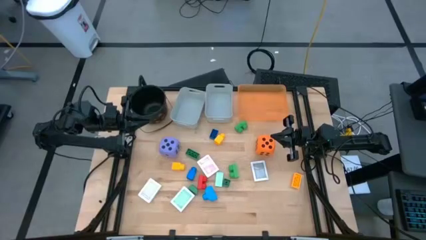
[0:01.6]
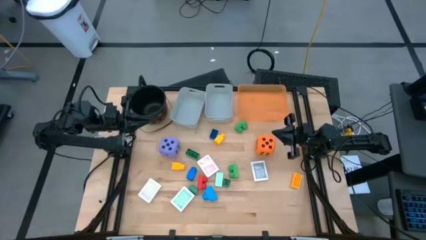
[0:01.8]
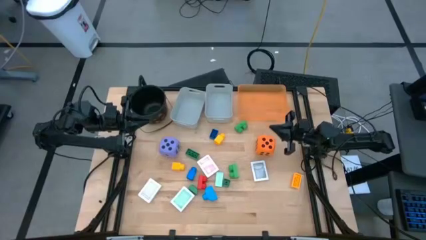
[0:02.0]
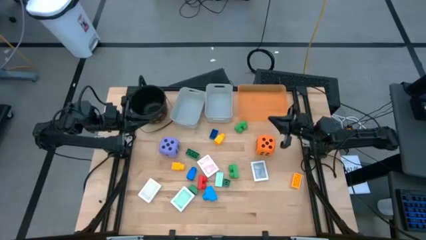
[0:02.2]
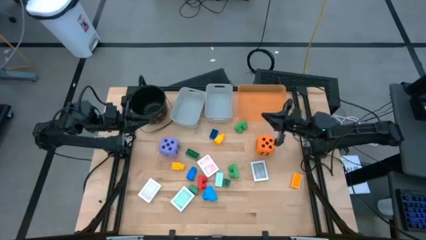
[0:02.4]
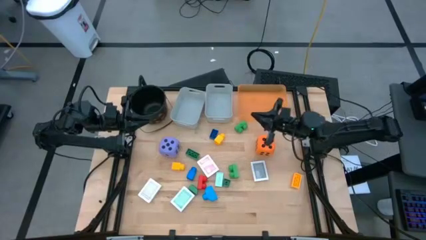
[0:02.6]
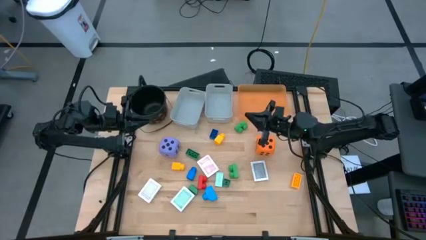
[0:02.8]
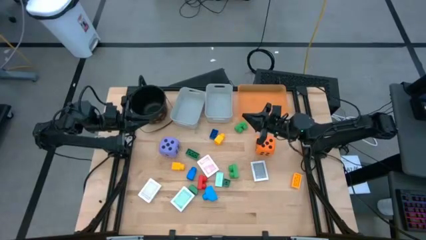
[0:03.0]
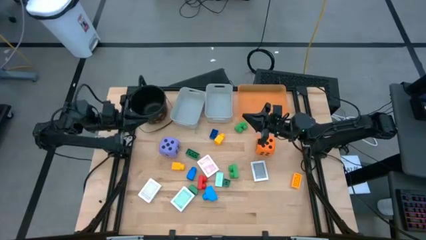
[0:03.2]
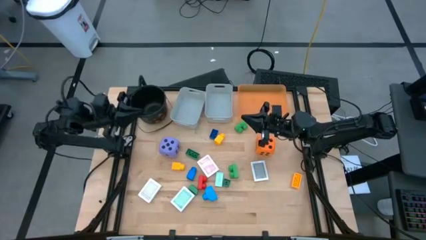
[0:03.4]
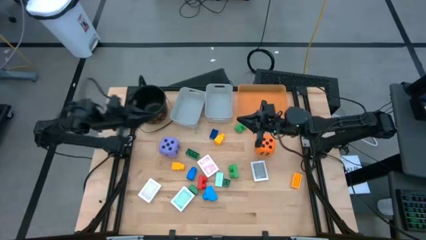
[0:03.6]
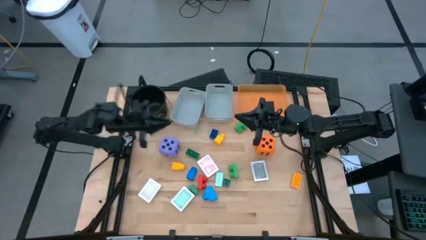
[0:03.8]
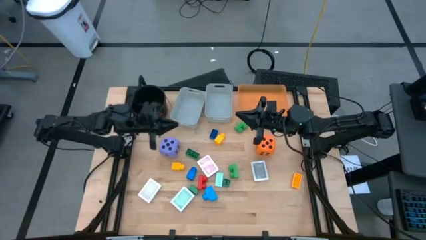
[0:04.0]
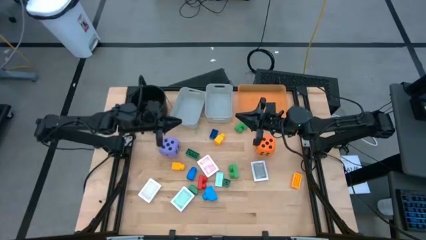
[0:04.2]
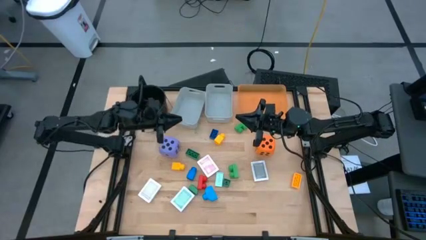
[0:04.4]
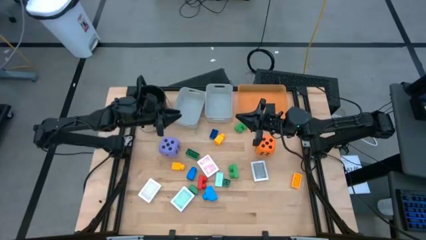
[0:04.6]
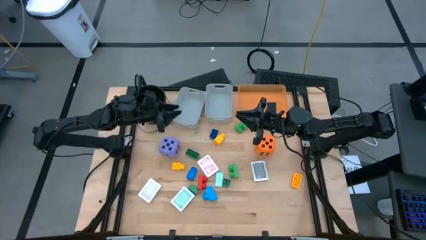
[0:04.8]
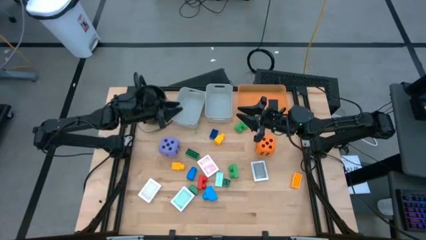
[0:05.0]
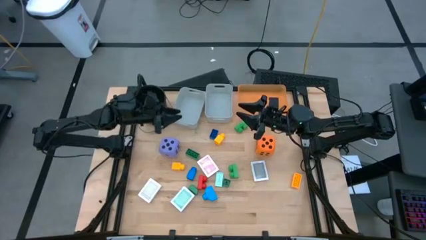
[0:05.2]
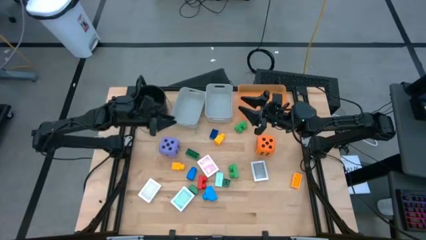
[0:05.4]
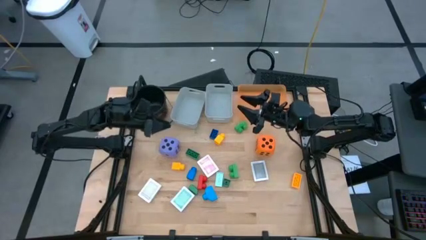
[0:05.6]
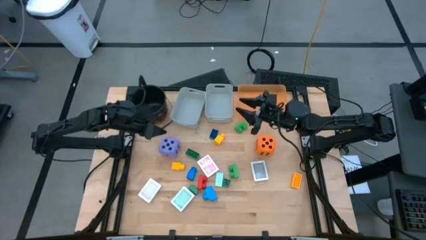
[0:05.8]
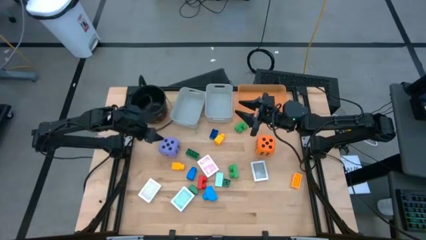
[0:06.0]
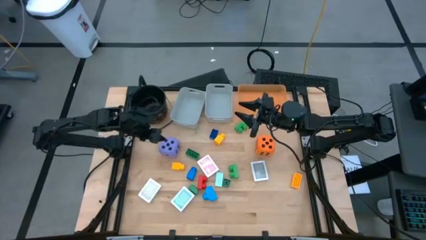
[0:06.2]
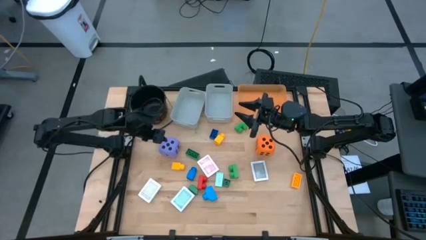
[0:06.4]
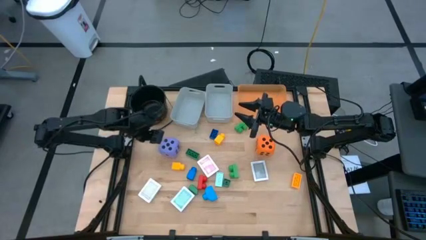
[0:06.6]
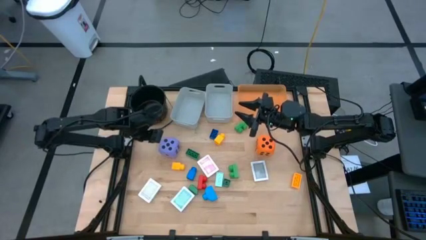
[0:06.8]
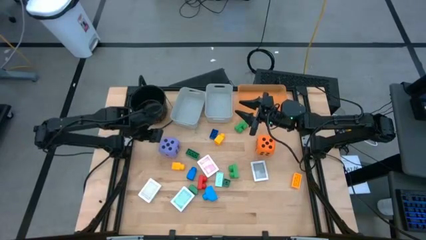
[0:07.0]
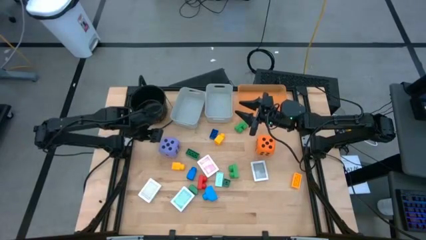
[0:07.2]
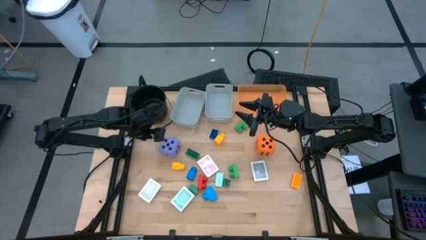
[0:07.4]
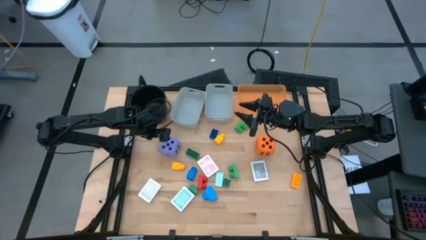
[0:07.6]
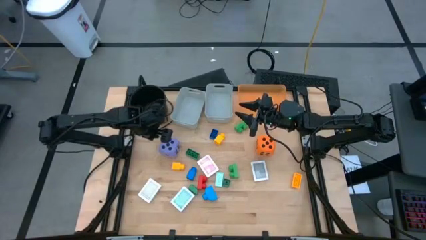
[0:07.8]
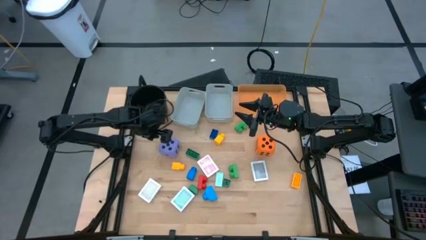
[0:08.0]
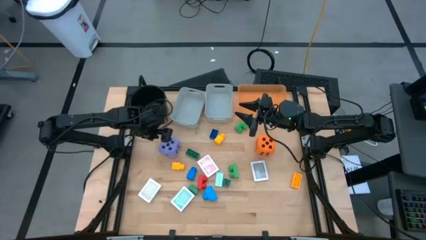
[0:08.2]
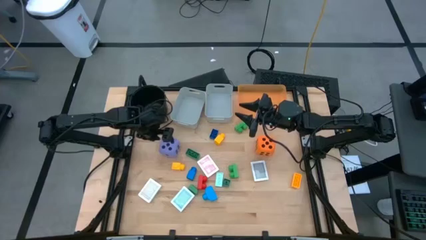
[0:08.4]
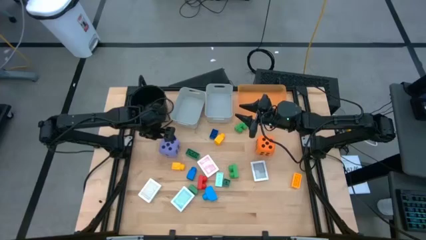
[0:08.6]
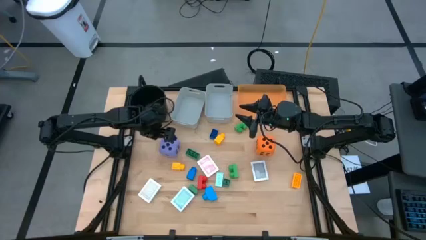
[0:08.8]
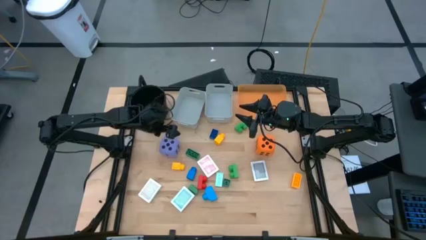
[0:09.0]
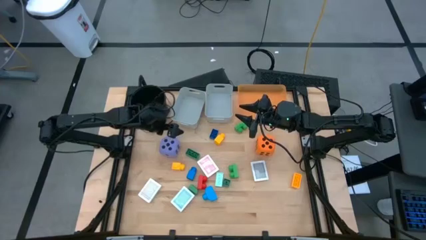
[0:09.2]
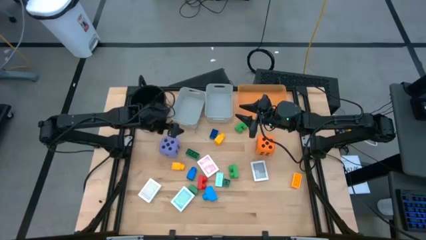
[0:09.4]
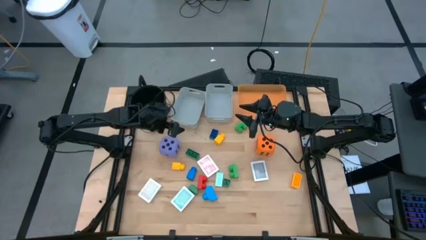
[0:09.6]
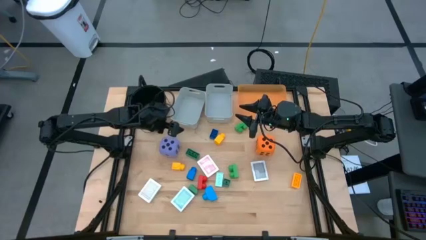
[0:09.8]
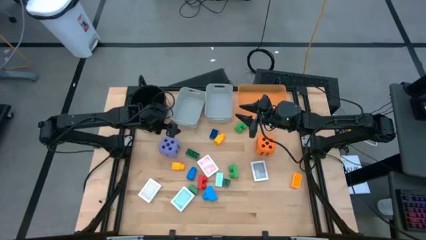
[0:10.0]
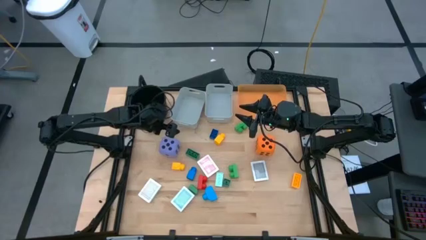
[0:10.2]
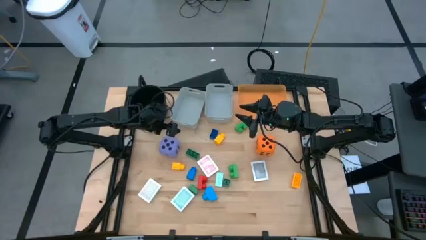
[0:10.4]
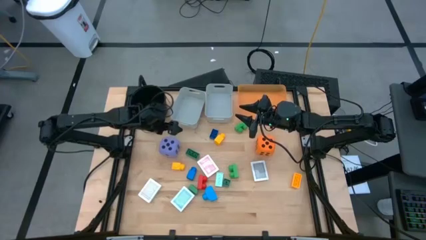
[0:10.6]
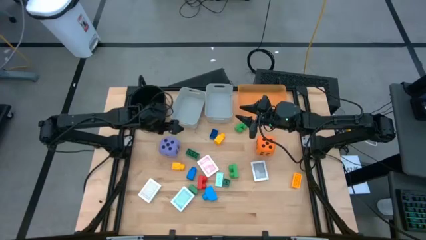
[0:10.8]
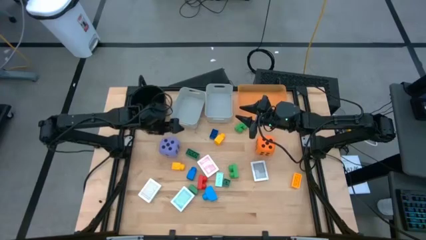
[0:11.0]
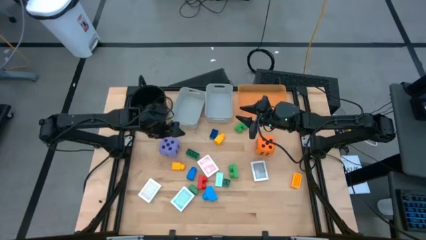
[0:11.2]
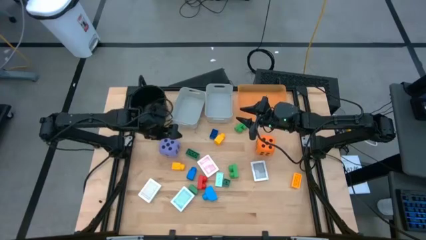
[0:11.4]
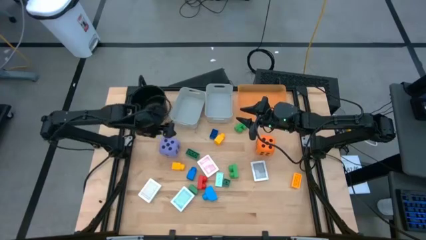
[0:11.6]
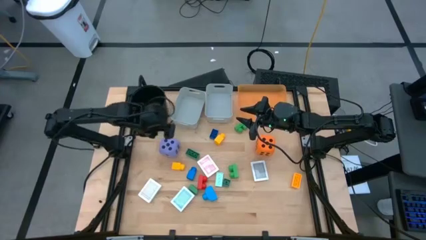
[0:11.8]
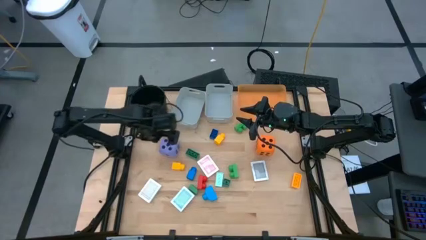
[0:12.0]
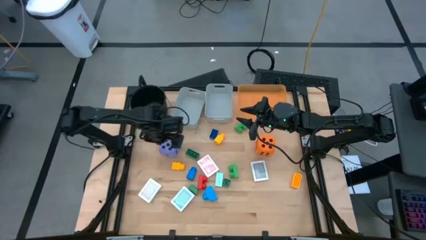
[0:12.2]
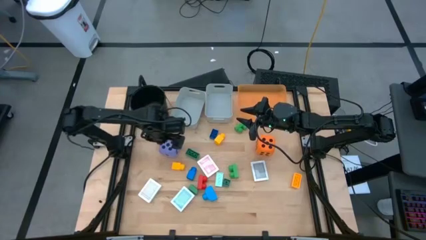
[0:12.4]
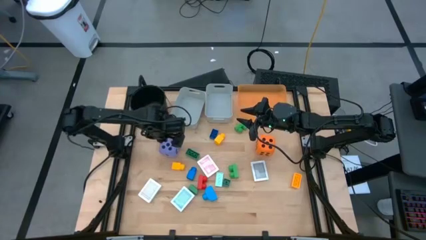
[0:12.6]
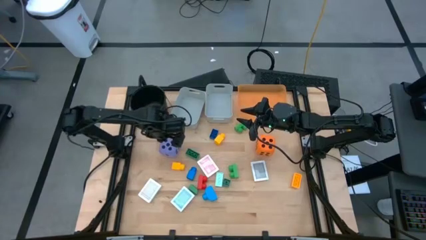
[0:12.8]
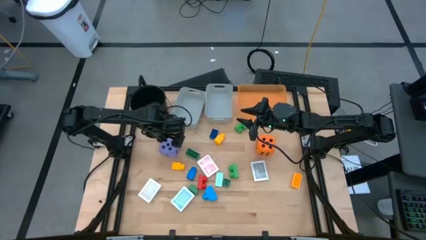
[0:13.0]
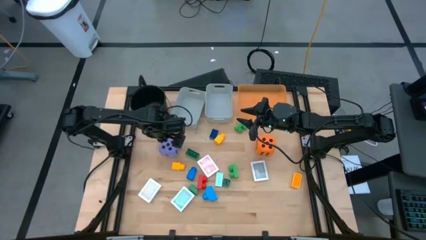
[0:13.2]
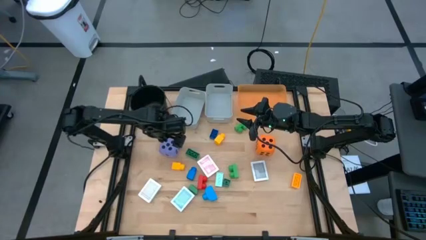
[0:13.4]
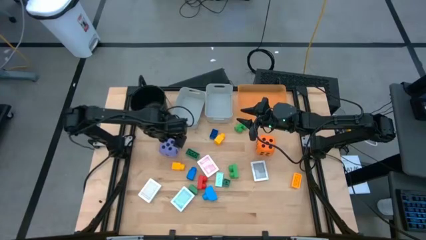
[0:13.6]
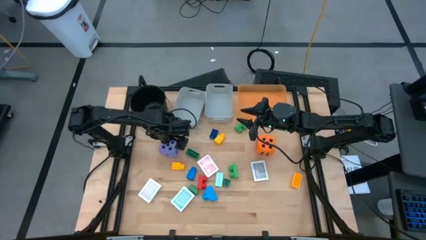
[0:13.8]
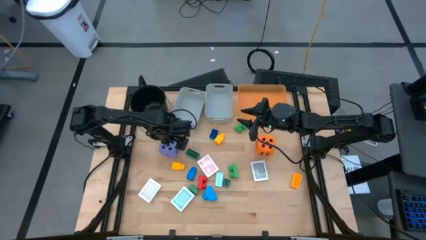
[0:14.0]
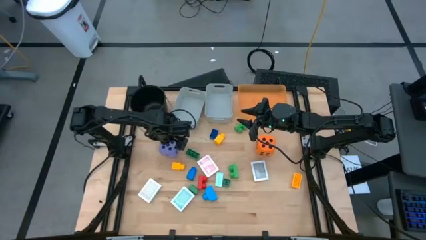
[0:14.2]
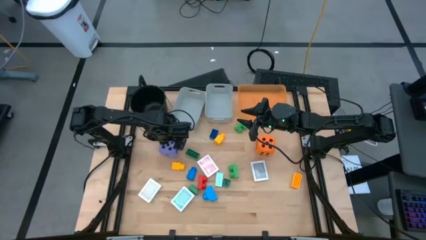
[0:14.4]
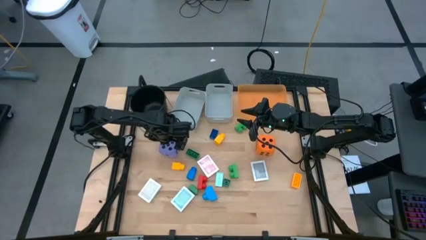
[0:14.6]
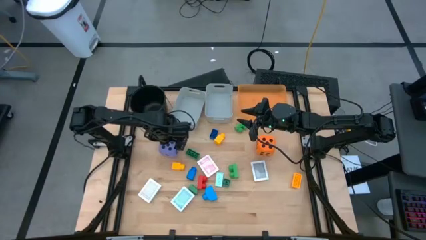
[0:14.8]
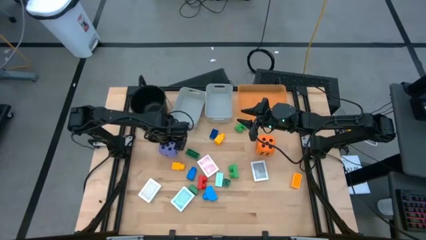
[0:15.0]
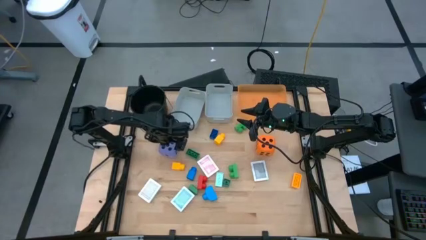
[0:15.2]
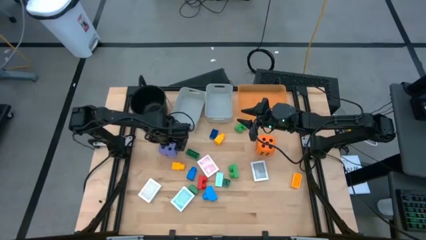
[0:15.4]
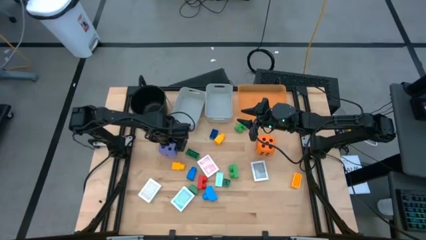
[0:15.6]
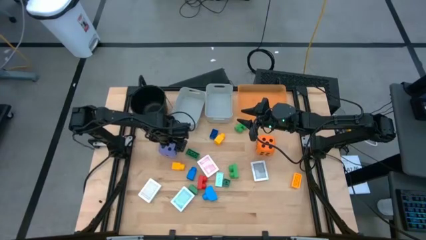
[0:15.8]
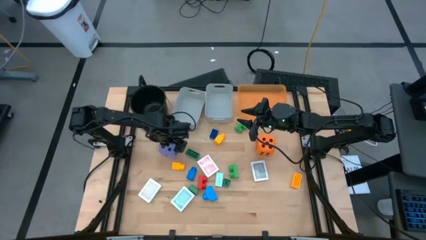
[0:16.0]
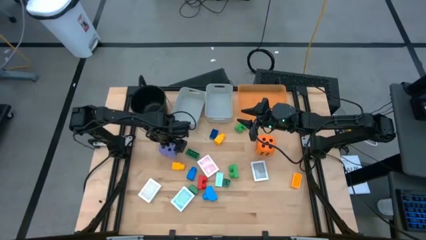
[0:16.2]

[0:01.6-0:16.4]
Task: Pick & Place Toys
Put the violet dice into the orange bin
